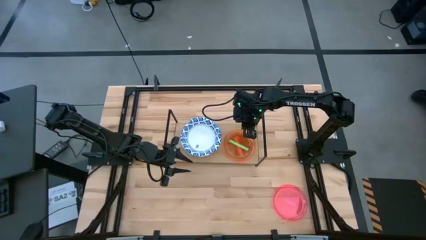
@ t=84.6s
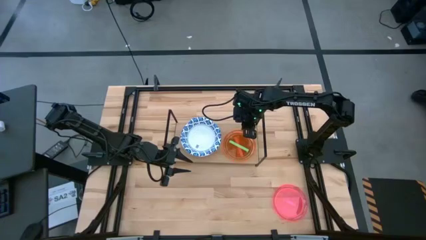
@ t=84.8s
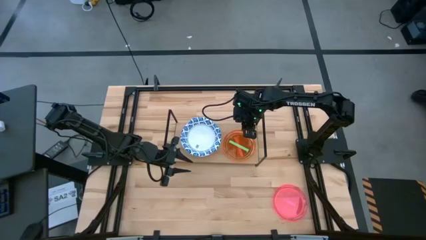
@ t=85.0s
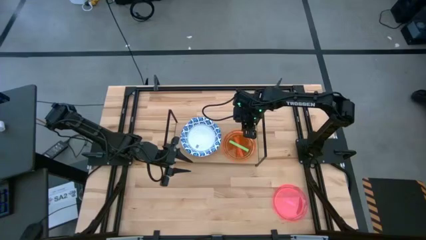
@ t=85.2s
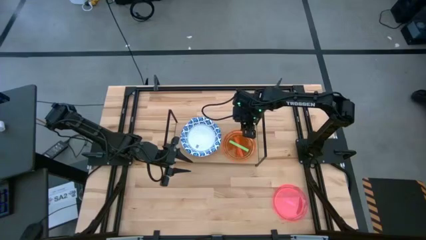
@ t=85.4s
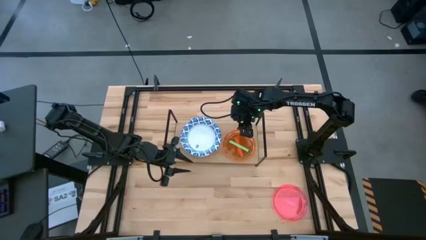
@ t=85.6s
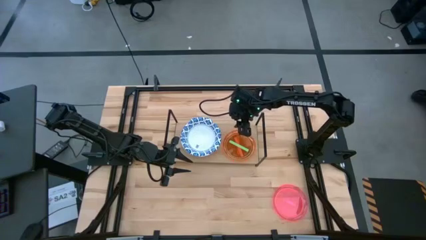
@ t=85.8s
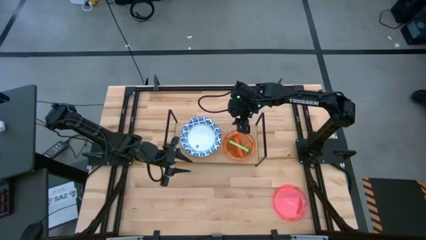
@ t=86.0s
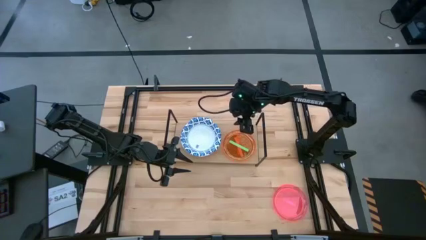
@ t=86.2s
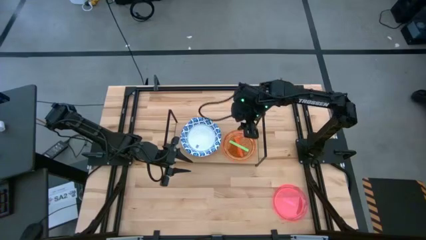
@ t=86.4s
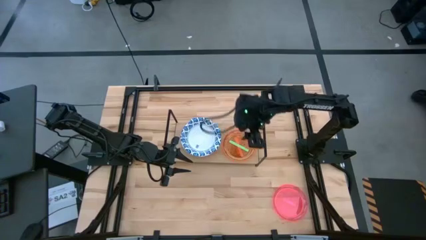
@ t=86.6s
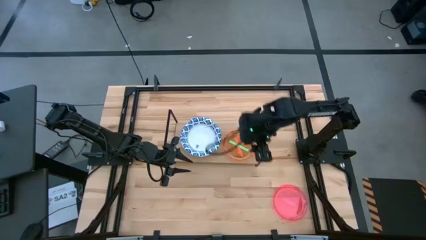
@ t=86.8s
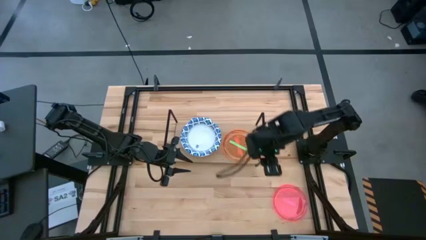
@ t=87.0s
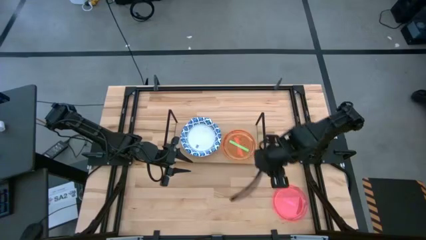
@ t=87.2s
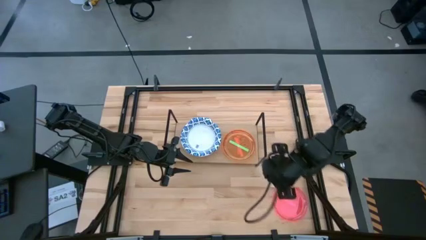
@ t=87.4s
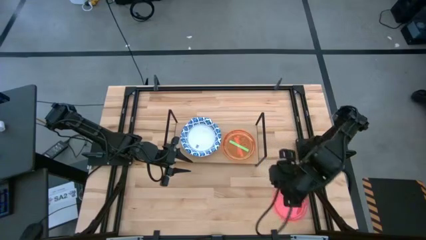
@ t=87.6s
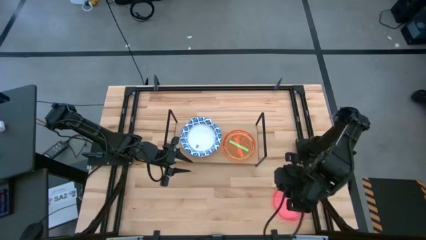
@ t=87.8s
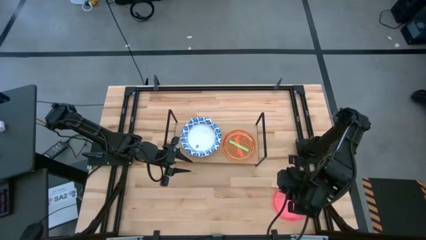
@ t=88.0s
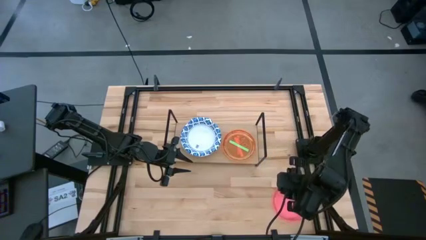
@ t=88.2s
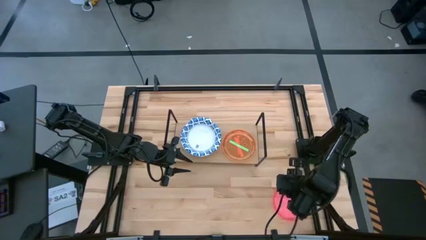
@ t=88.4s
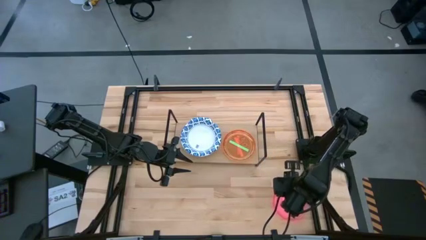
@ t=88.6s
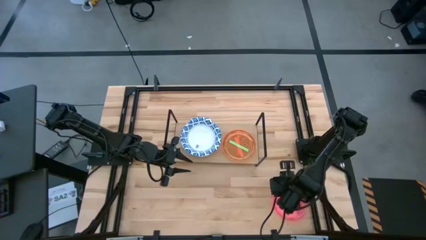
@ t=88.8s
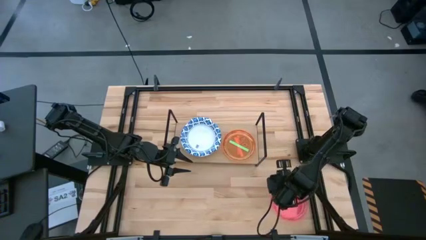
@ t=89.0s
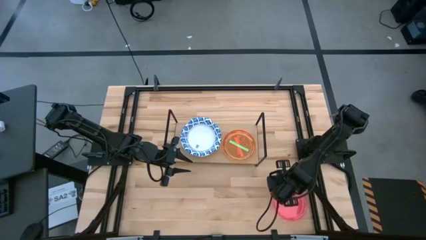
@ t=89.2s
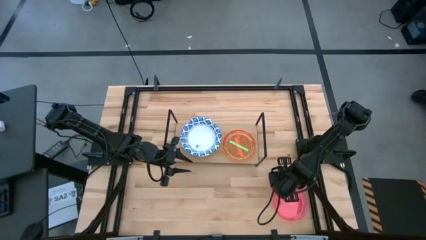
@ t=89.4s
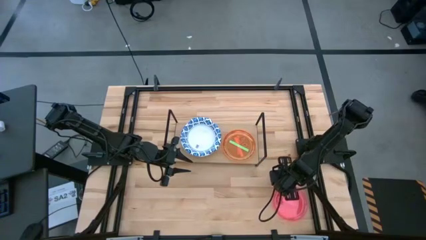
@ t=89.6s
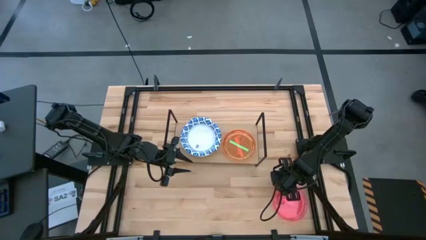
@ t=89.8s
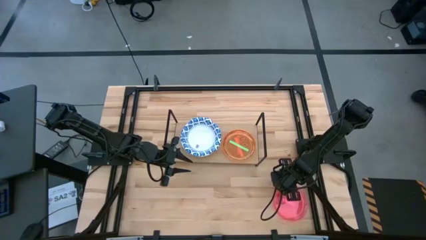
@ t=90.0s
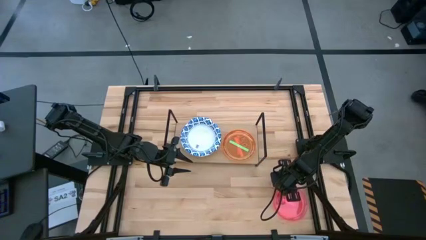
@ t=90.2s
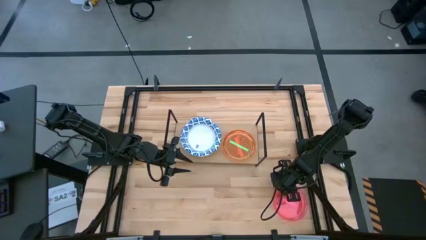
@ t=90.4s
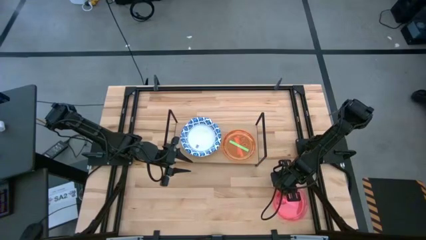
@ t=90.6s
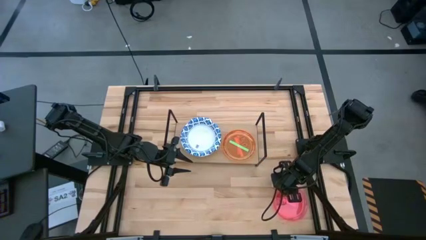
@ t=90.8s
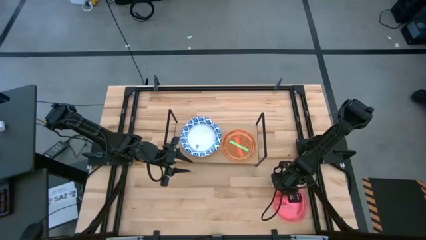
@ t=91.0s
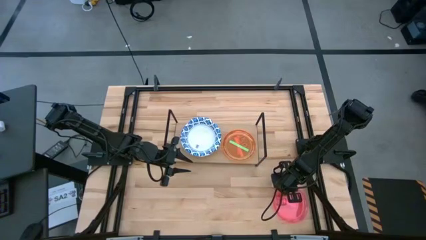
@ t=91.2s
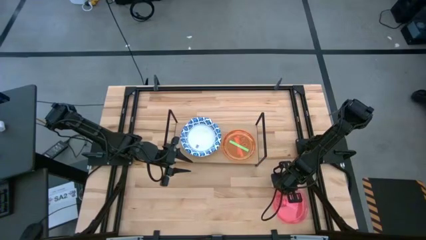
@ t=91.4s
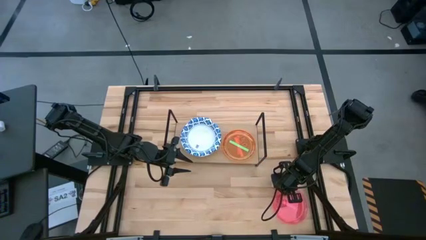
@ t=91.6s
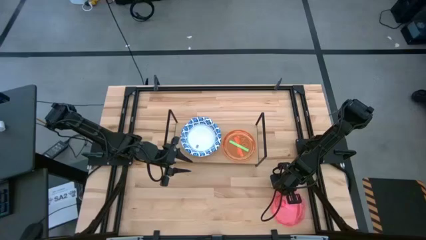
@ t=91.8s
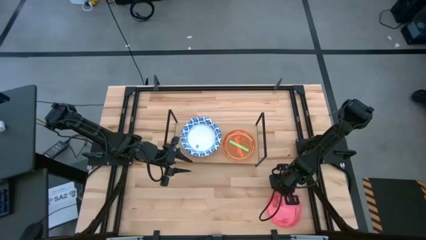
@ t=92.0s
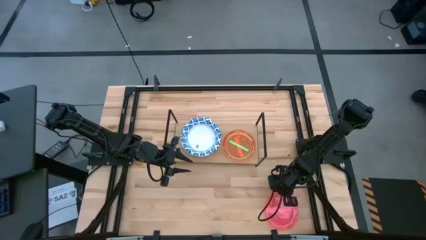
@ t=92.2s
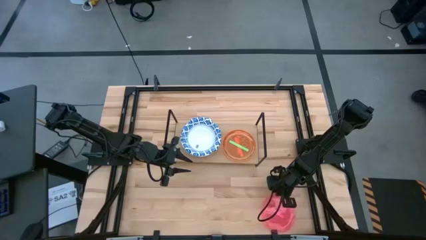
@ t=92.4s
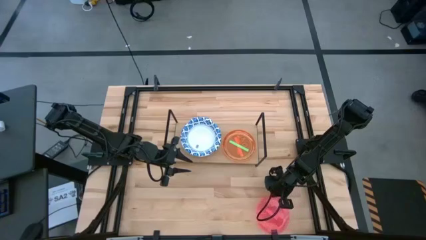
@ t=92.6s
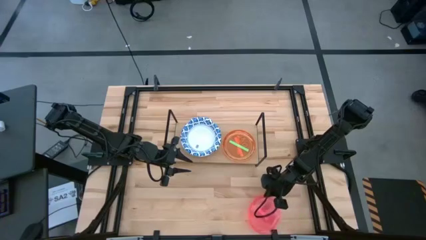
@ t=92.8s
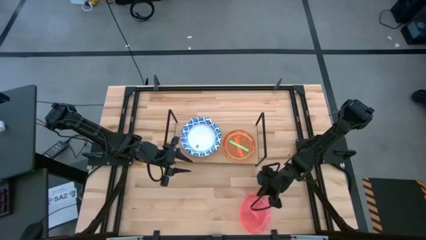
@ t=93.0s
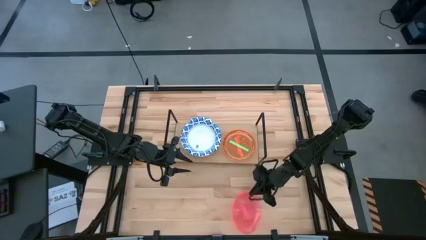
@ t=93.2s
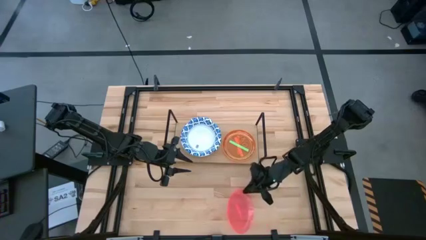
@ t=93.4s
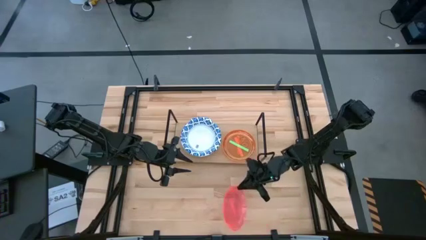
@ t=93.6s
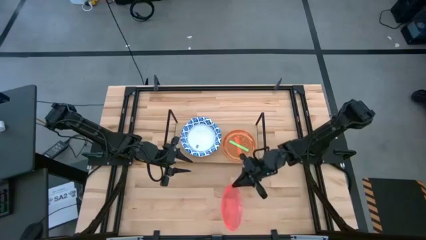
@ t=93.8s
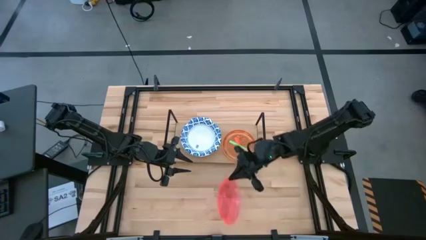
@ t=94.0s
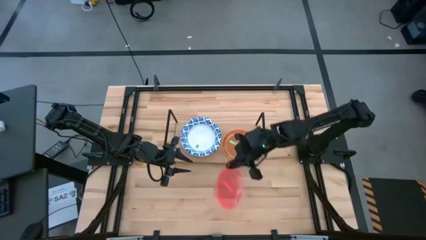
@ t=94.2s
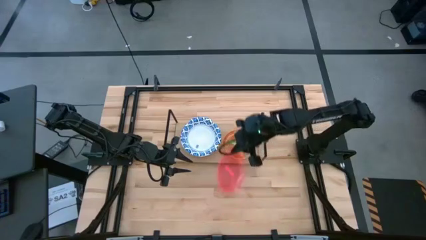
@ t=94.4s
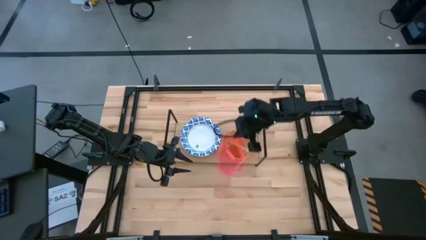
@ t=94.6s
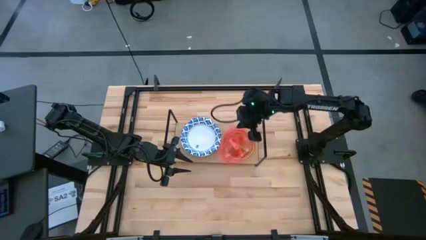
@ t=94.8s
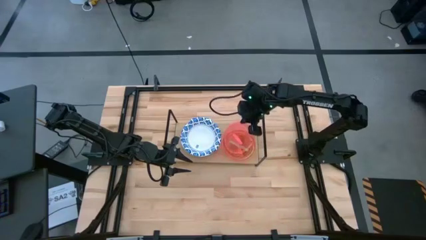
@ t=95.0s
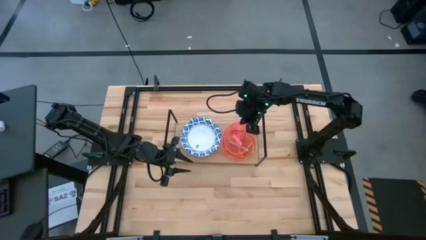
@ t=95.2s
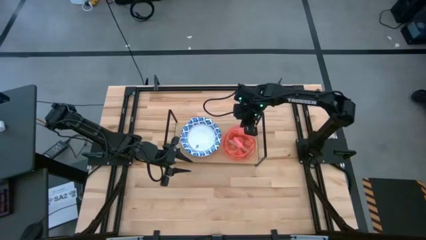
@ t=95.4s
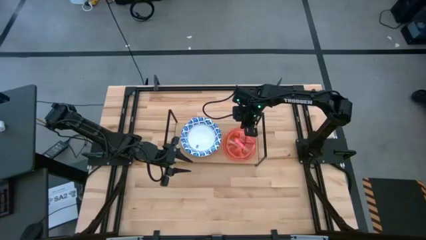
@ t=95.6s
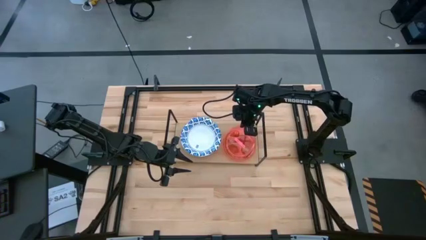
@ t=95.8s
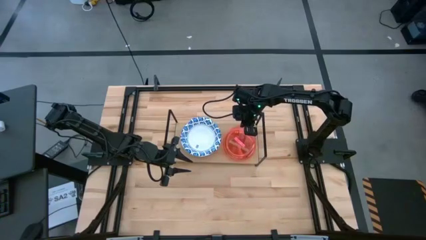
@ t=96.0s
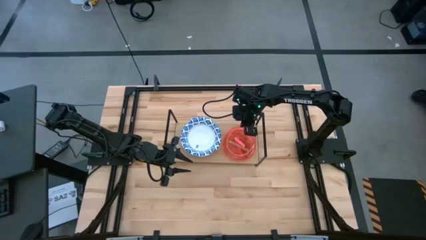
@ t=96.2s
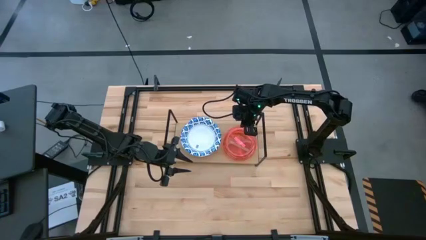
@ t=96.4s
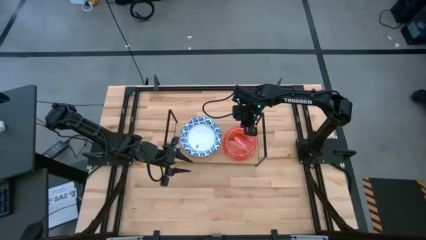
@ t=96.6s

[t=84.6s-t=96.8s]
Task: Place and stack plates onto a shelf
Stack the pink plate on top of the green plate on the shelf

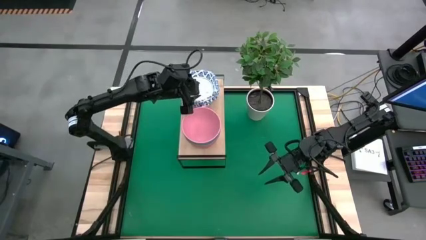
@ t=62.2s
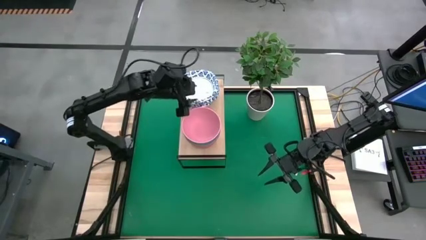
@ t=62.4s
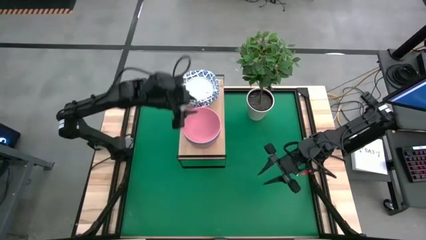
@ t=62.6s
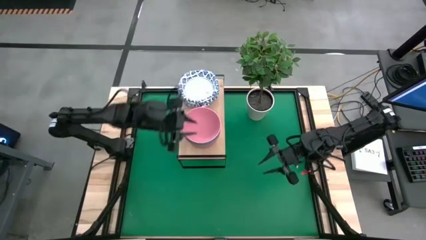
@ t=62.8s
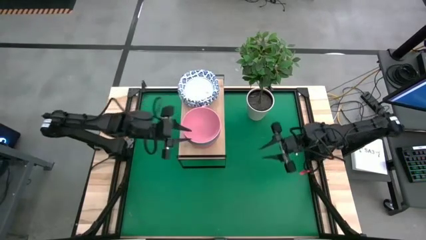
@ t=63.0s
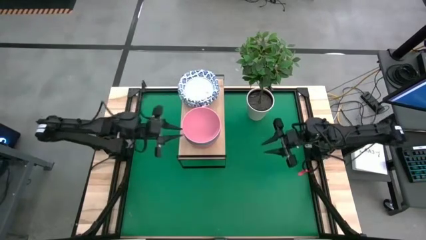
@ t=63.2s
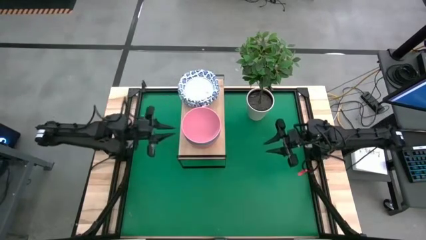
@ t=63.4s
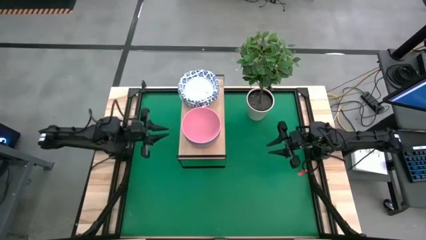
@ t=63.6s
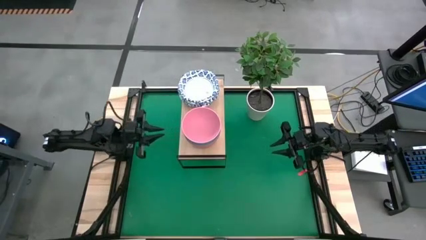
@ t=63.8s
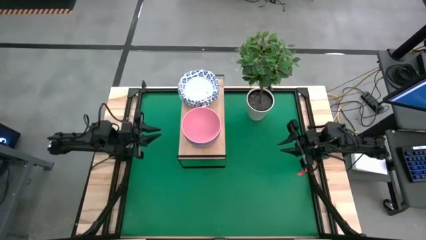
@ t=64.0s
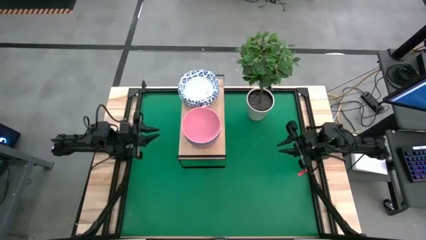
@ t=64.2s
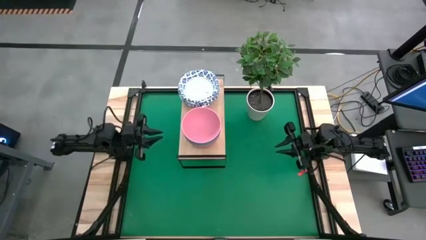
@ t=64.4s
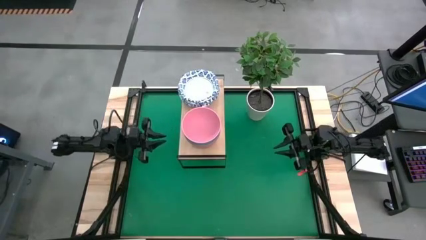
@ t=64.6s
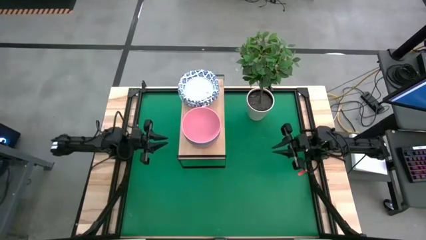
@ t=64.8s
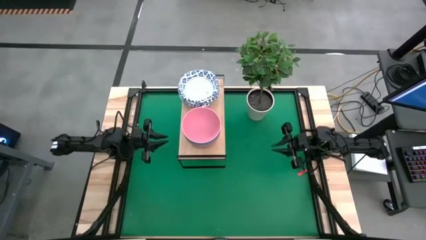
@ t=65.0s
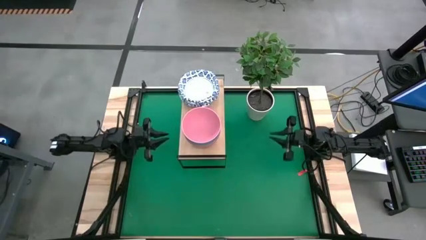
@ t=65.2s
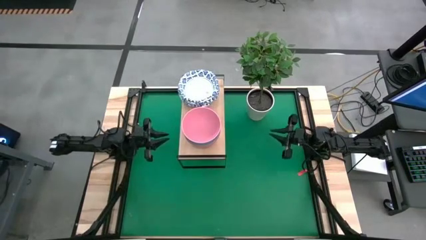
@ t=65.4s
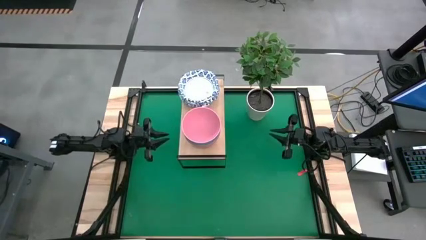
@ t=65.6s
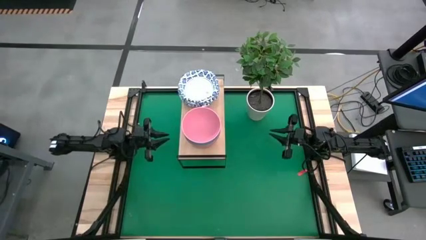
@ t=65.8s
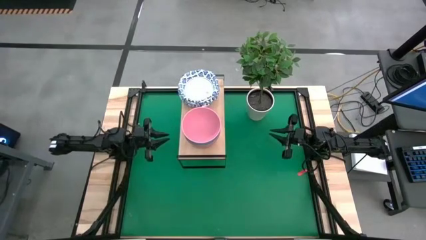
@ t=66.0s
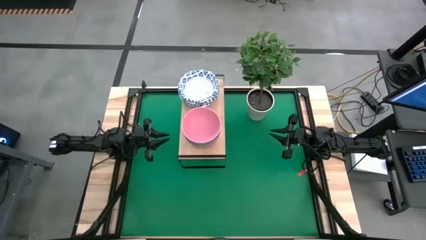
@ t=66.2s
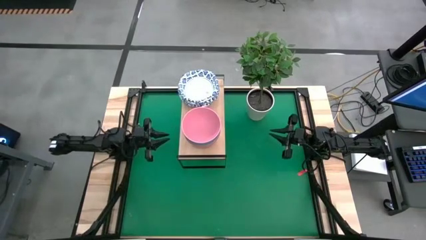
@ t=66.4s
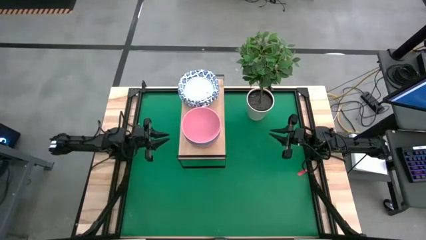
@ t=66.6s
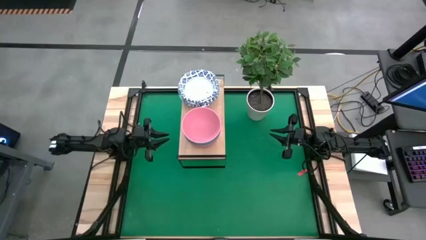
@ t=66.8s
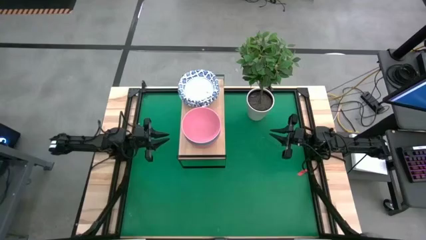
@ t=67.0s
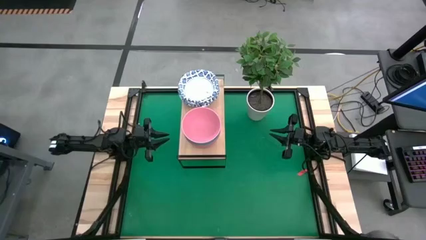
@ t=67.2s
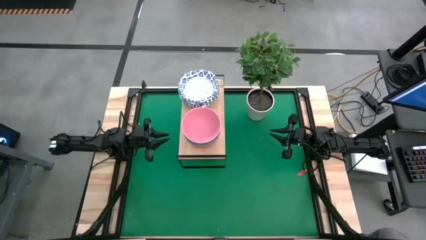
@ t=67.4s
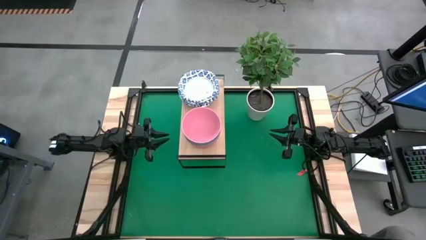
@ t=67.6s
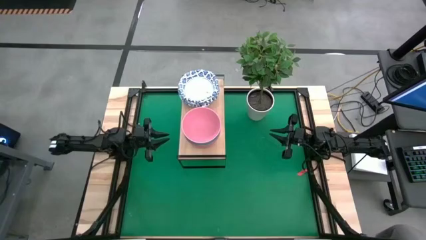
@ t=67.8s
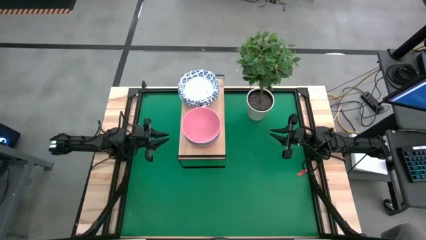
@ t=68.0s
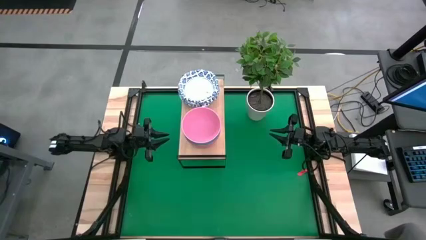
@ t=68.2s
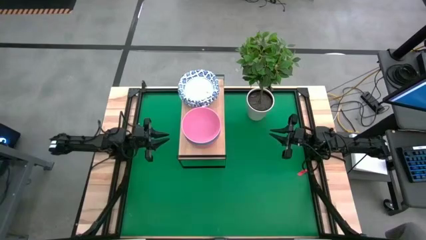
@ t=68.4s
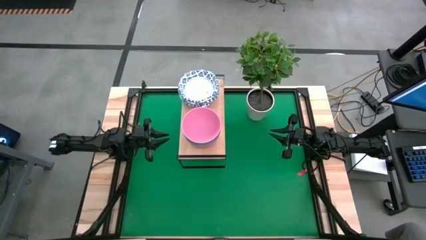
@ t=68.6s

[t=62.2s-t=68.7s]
Task: Place and stack bowls onto a shelf
Return to Home Position
